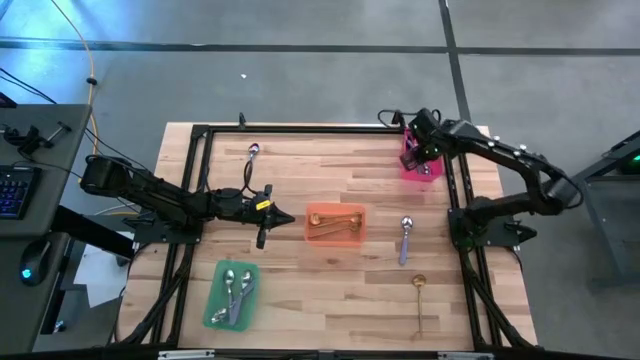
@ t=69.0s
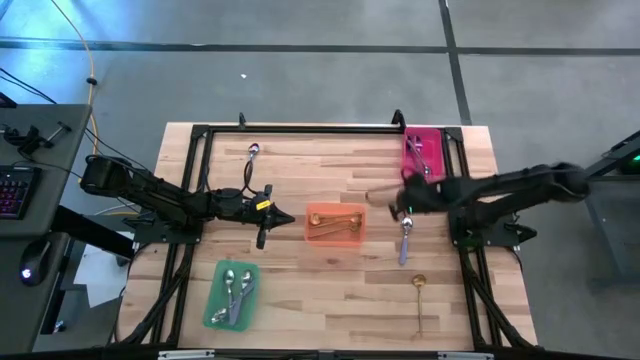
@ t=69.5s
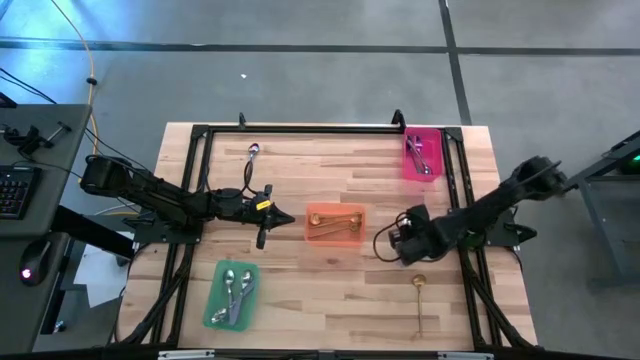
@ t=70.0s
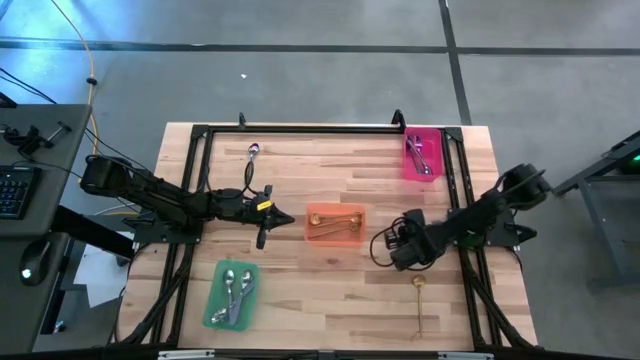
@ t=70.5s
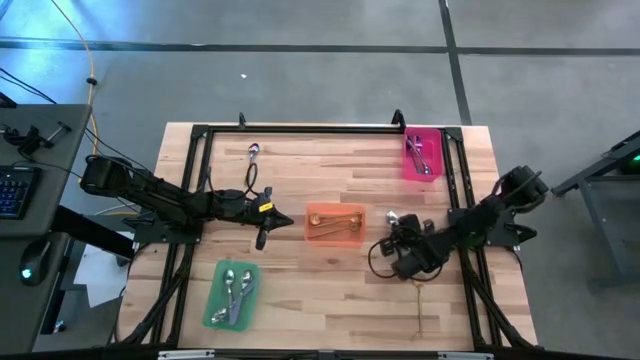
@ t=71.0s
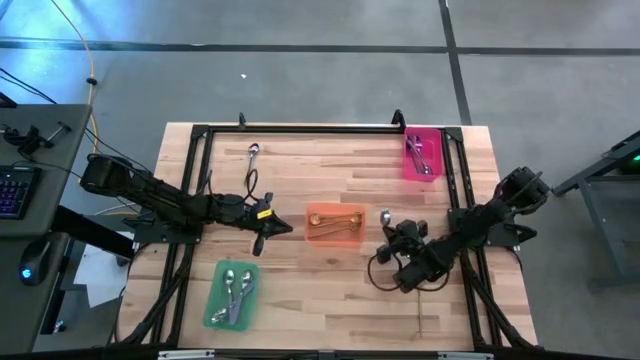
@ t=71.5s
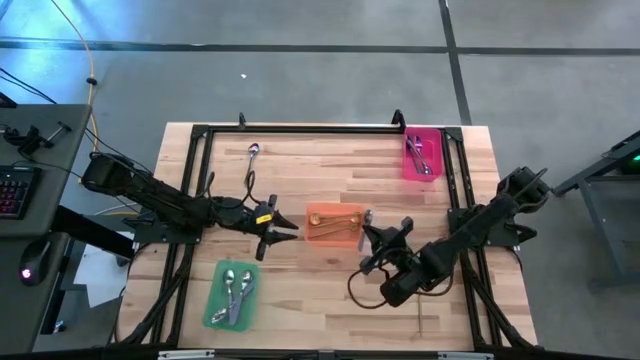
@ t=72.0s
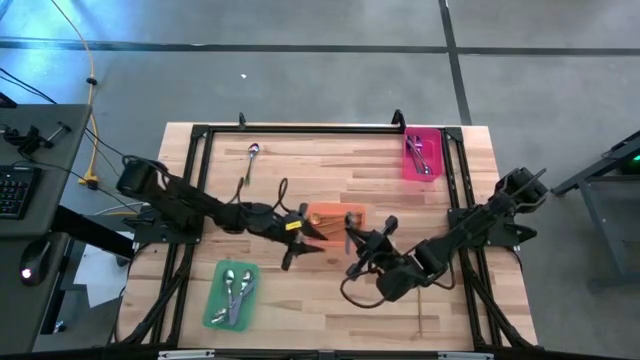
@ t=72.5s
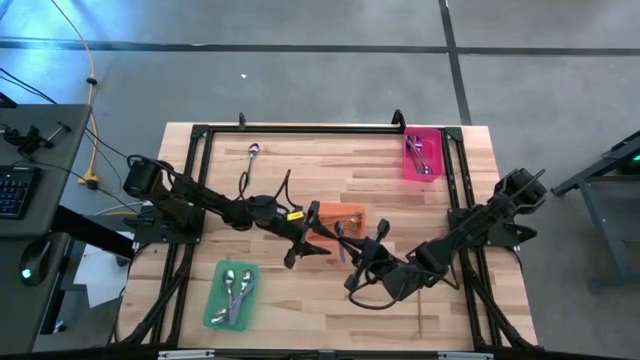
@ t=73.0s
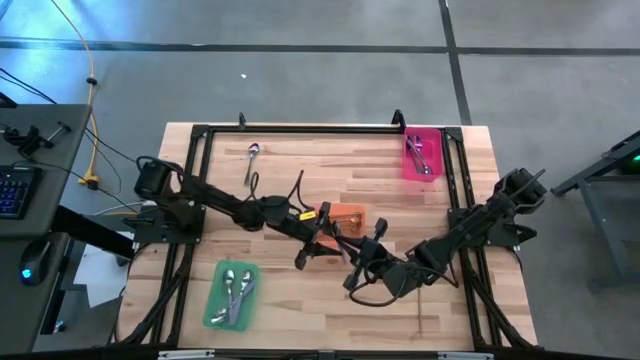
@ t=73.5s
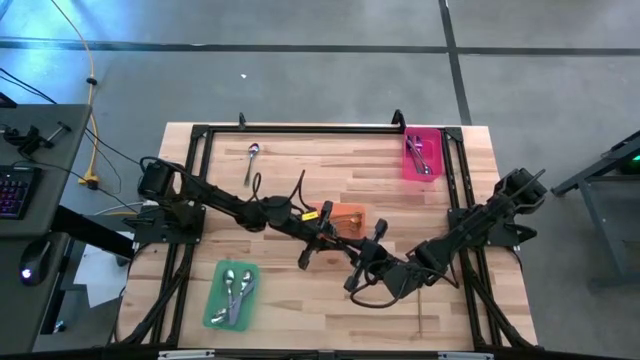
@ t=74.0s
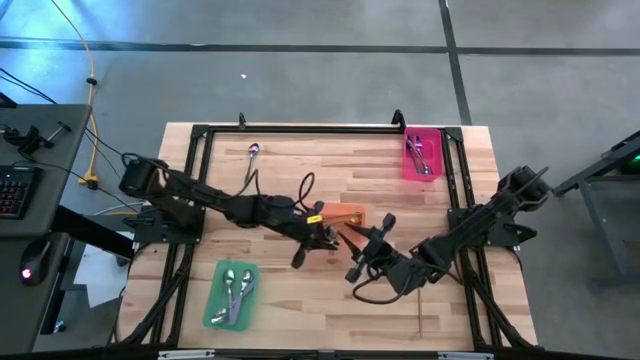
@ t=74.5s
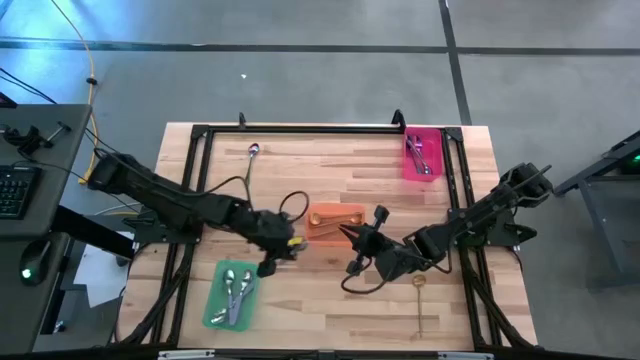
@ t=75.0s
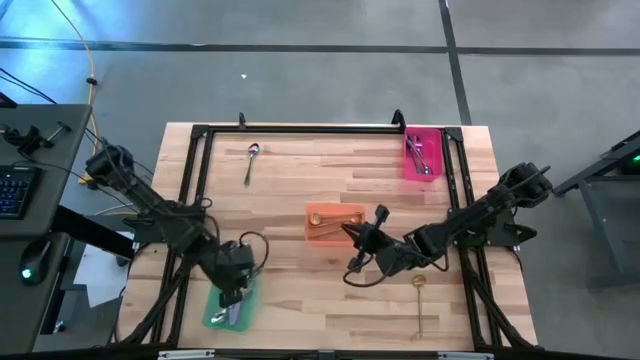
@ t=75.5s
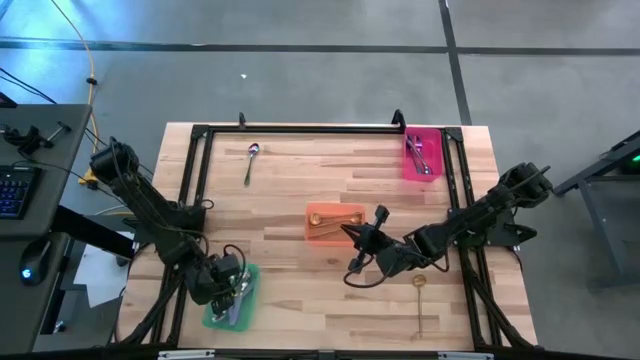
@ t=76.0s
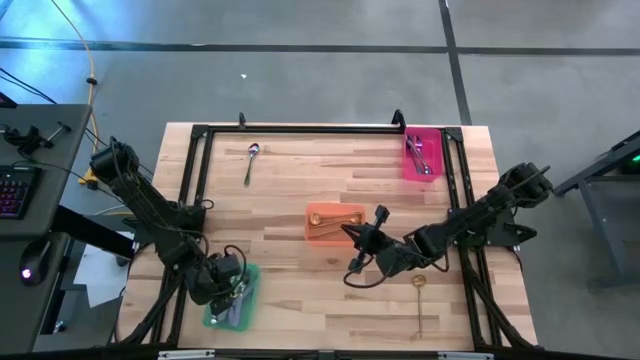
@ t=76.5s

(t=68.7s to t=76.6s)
Task: Sort silverware by color (type)
Put the violet spoon into the green bin

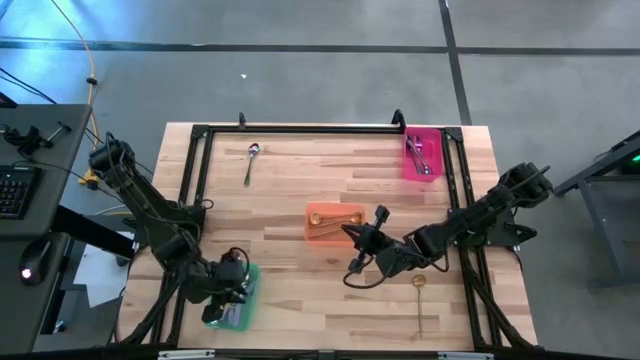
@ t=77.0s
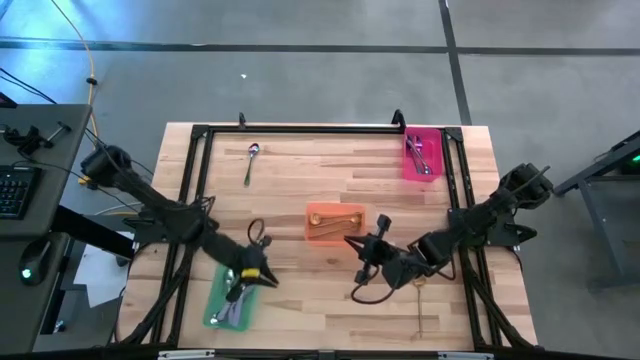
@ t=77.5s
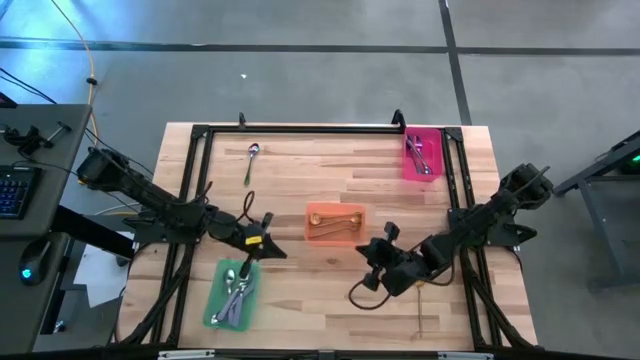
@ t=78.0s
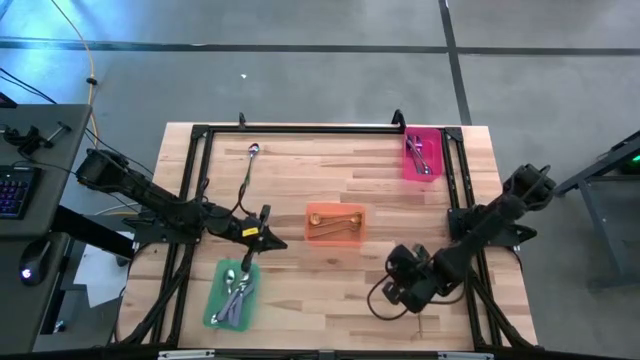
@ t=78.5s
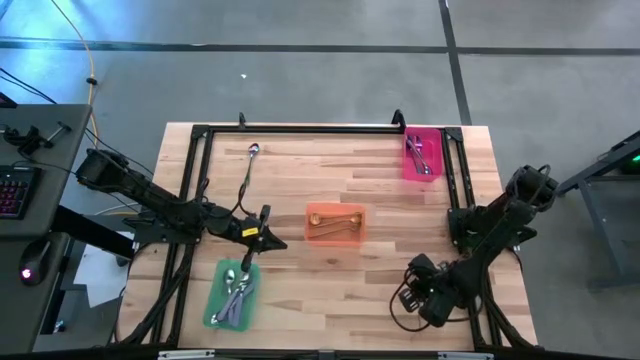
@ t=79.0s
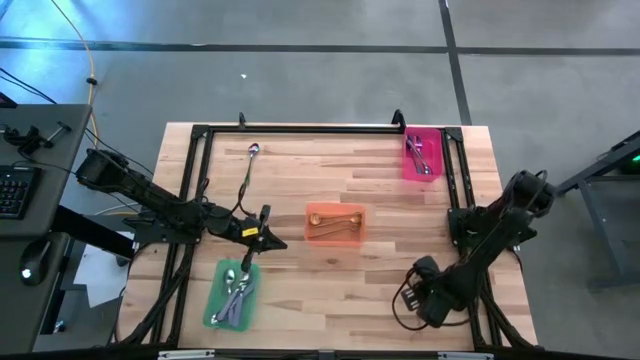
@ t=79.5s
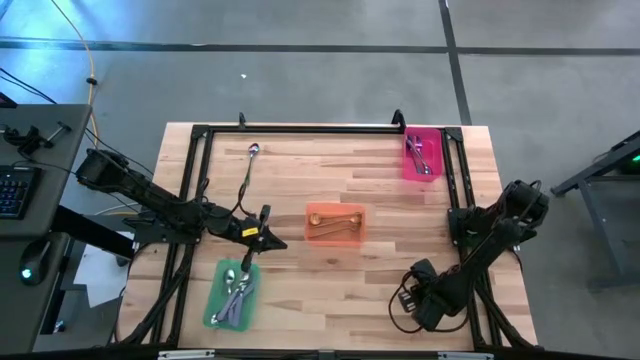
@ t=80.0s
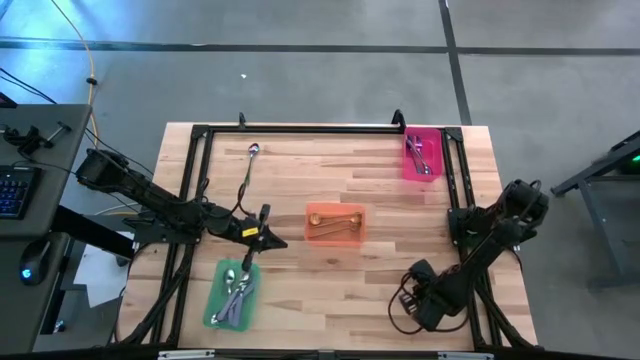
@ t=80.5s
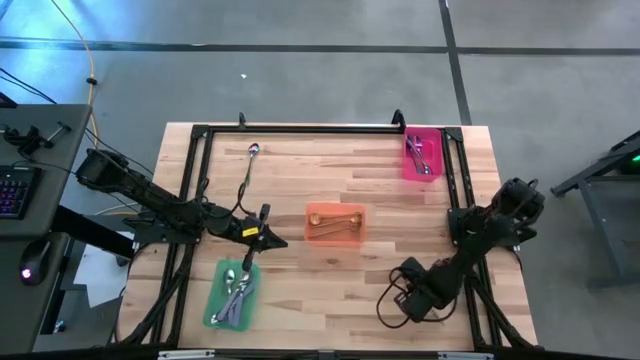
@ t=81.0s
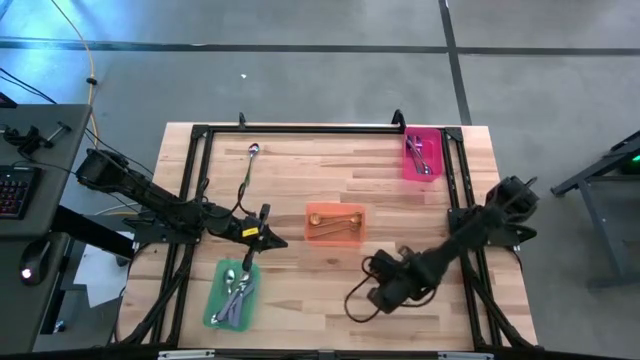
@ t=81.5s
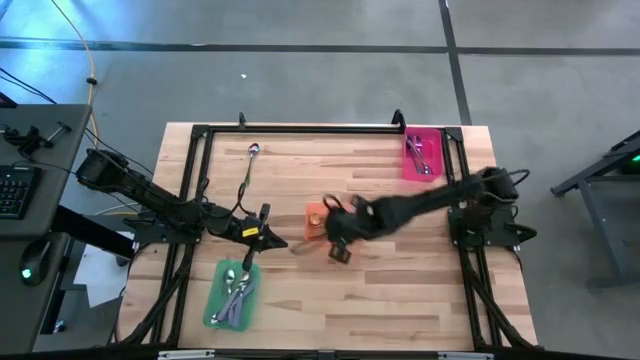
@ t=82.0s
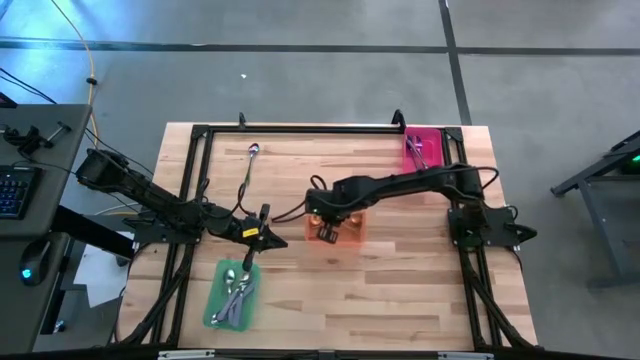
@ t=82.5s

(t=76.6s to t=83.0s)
Put the gold spoon into the orange bin

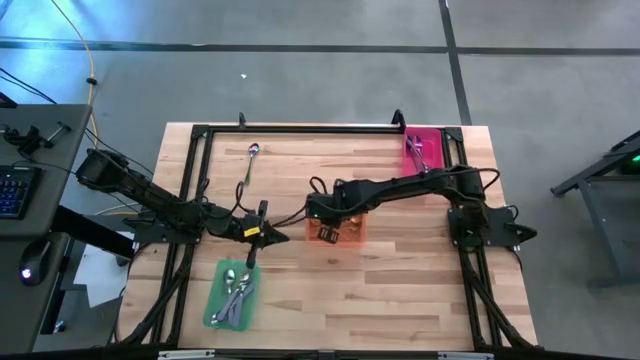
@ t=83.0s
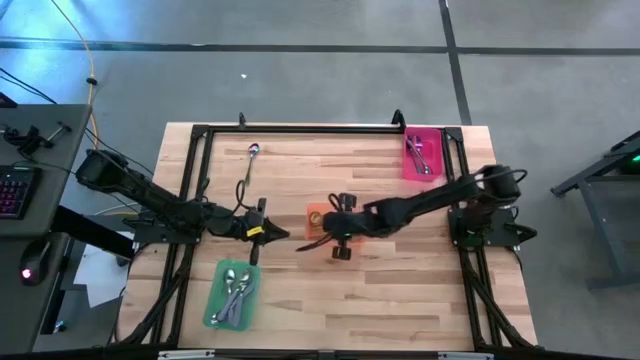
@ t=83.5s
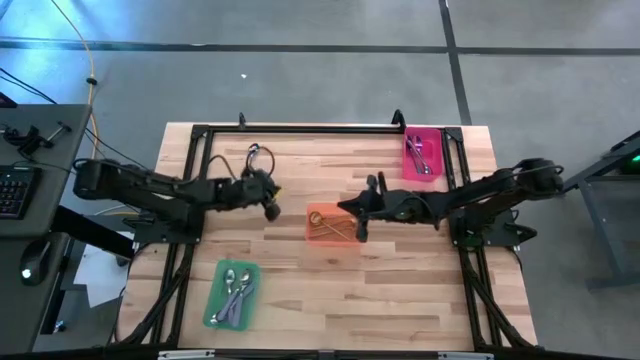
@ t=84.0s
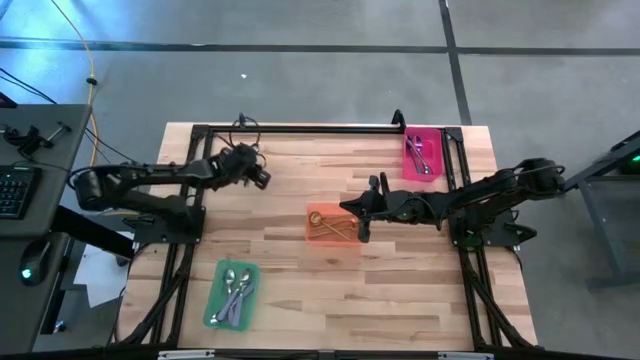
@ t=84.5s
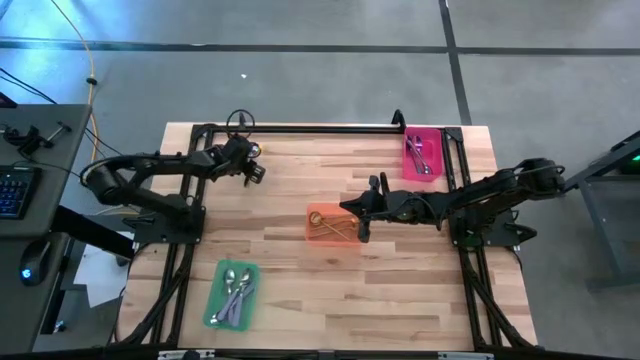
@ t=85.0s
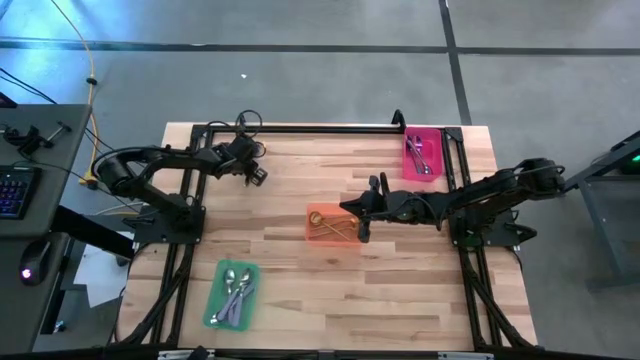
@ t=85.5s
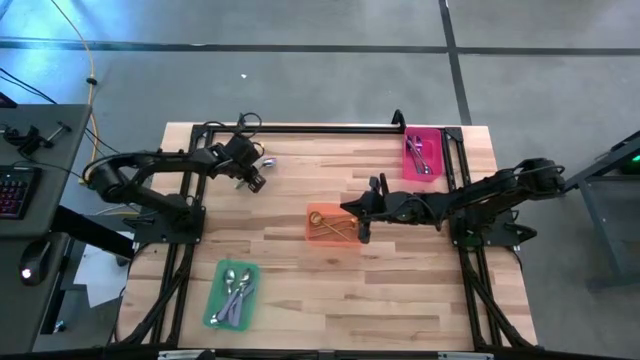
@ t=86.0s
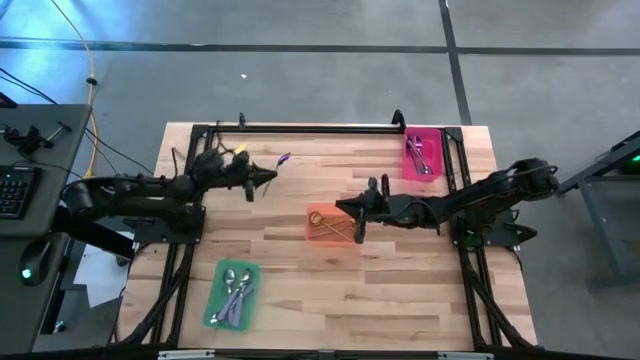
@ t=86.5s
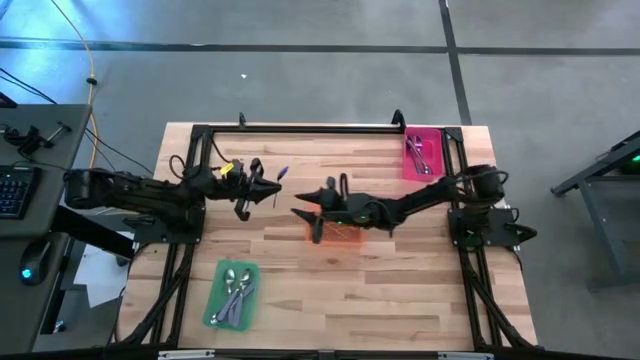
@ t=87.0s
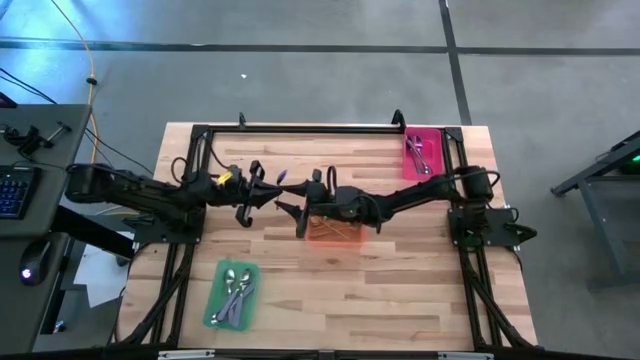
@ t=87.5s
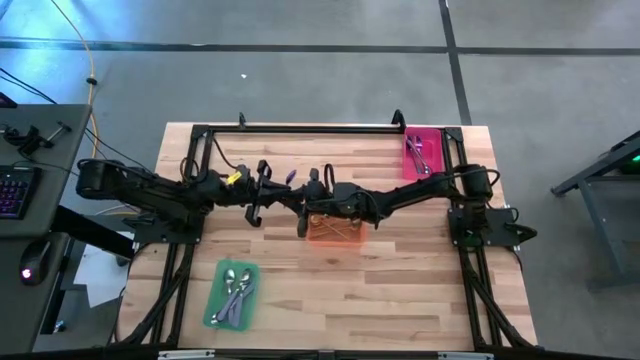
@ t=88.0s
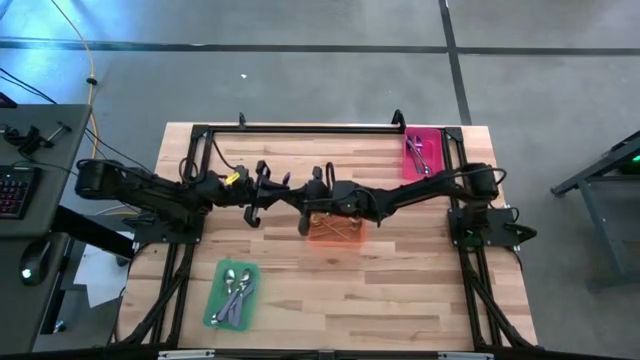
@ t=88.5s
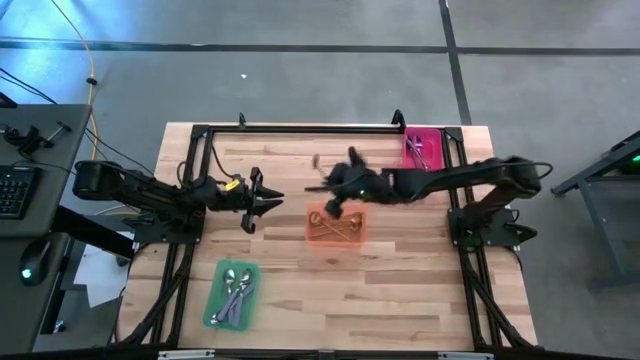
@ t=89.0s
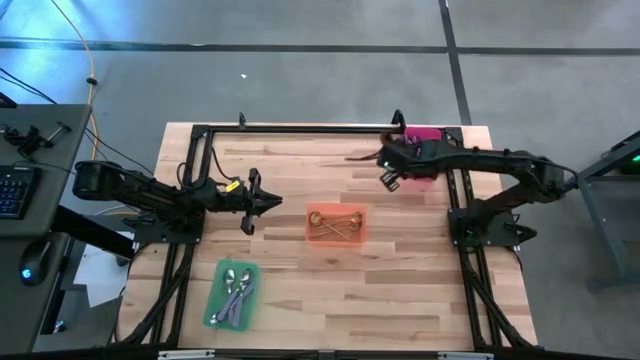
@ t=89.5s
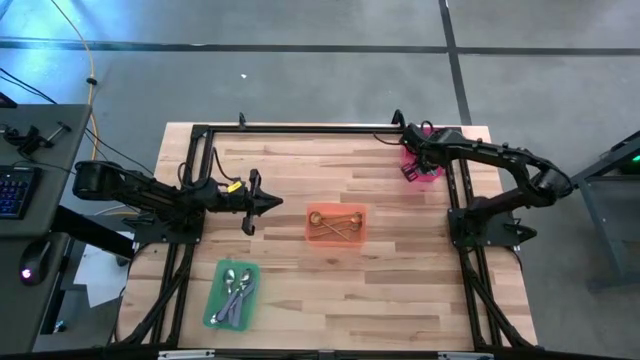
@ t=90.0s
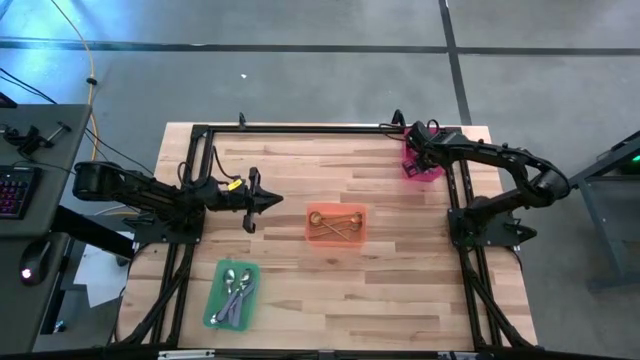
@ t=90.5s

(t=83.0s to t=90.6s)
Put the green spoon into the red bin
